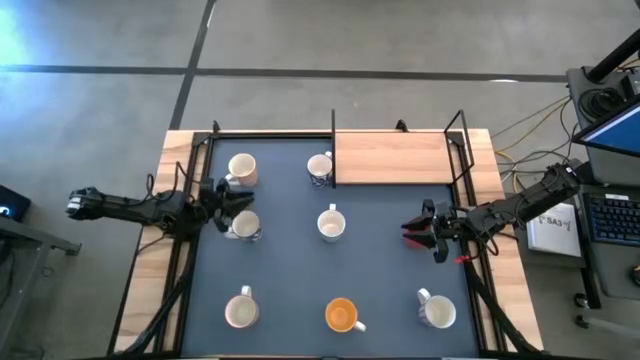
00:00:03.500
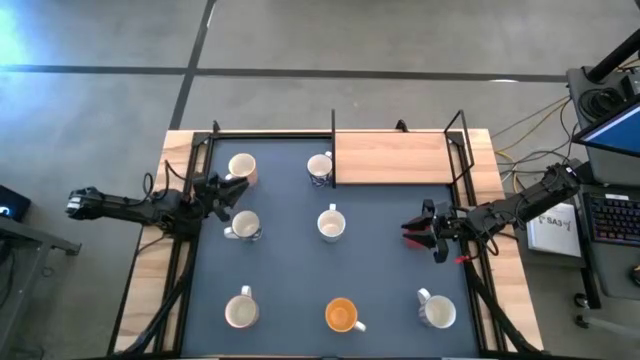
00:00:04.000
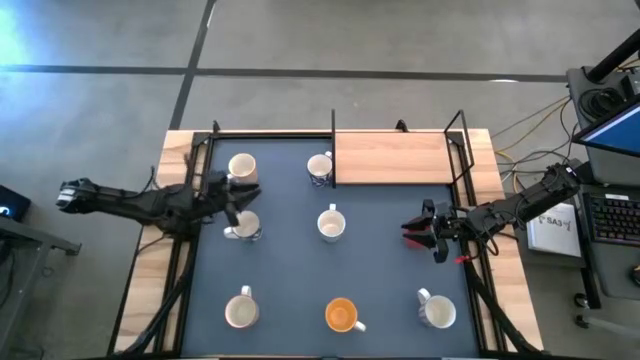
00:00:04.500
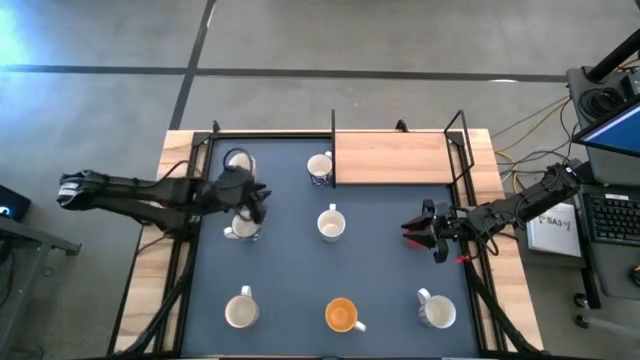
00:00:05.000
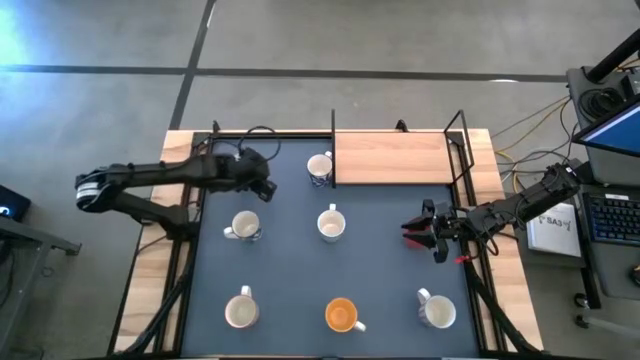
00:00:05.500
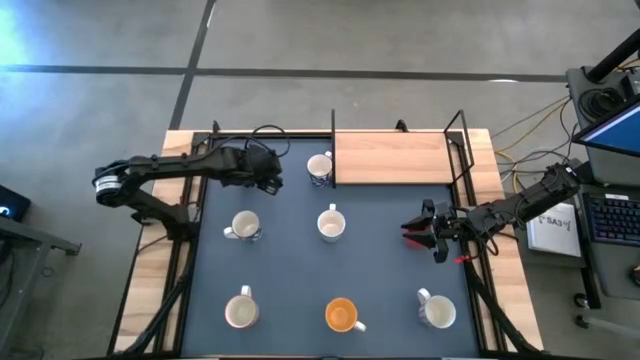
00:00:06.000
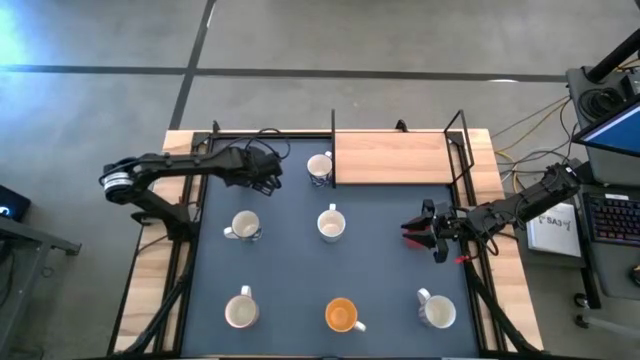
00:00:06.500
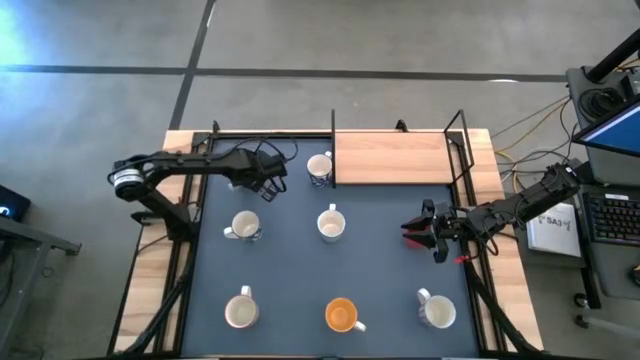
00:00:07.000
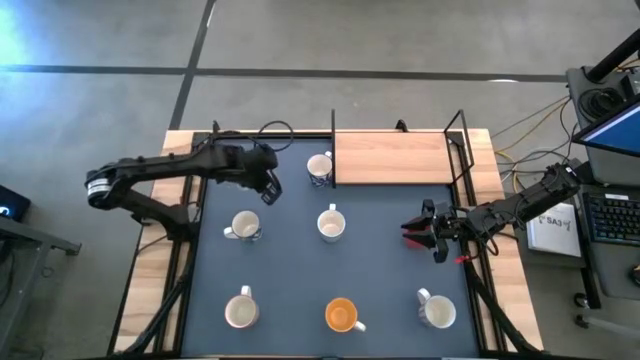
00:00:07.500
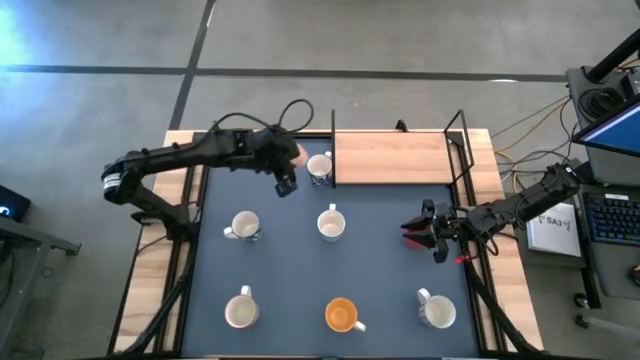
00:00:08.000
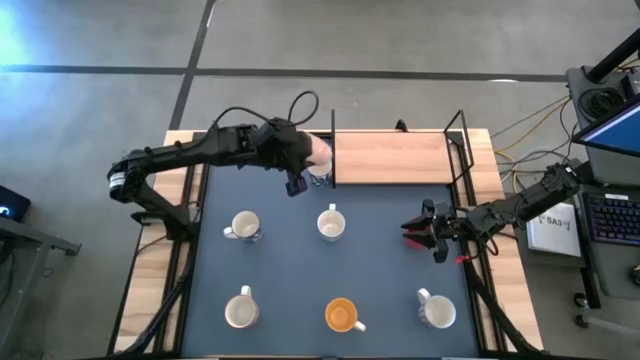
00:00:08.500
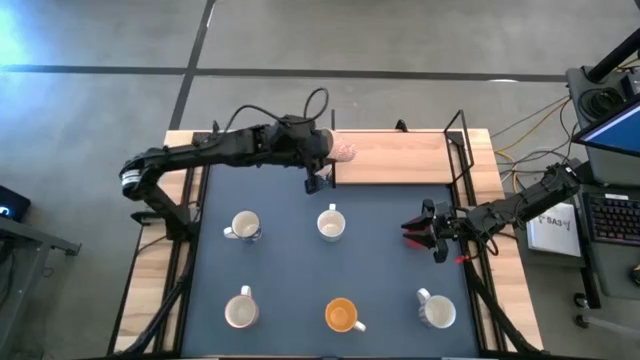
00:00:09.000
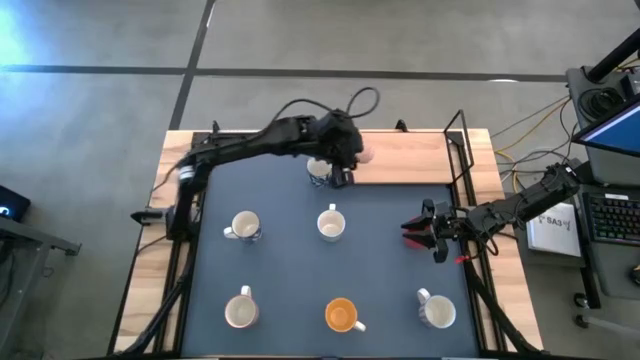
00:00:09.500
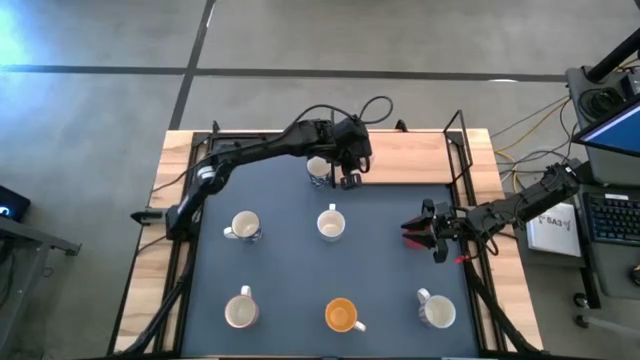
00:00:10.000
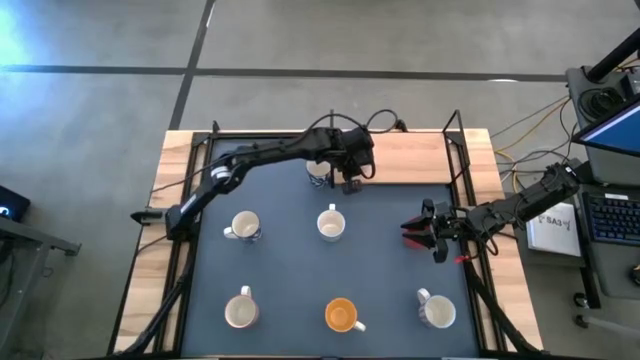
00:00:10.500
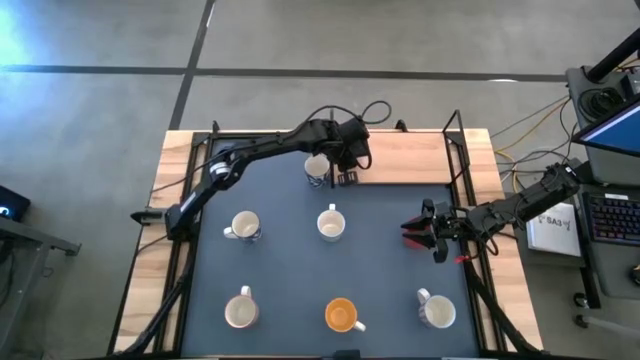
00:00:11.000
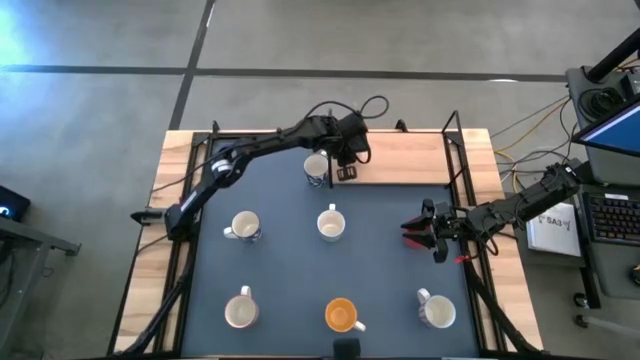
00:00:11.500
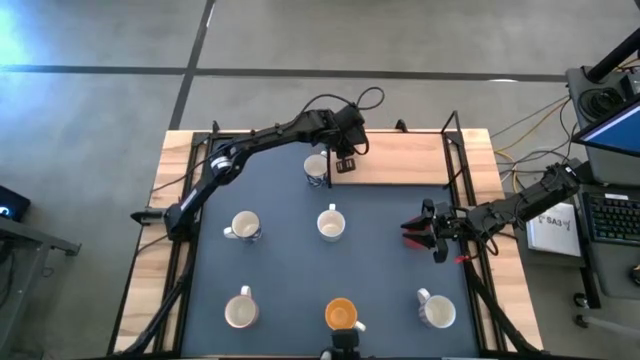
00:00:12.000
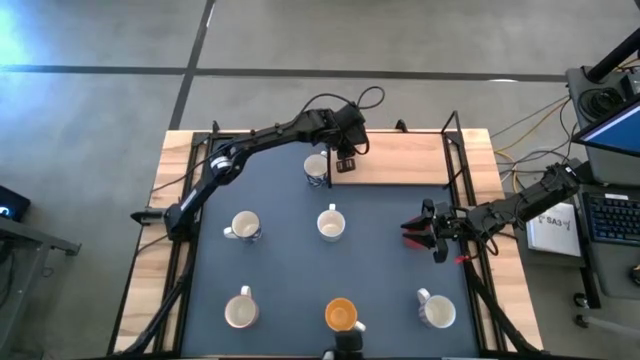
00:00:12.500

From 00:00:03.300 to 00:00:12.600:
Task: Place coffee mugs
Put the orange mug on the shelf

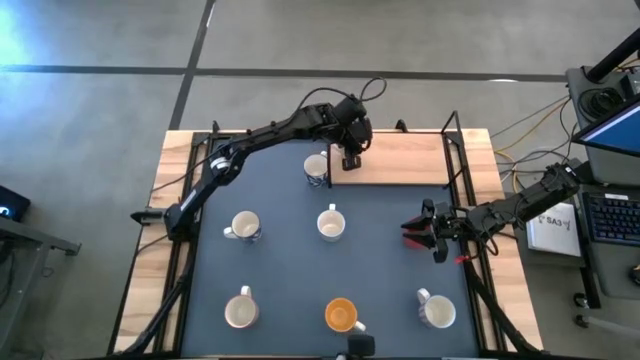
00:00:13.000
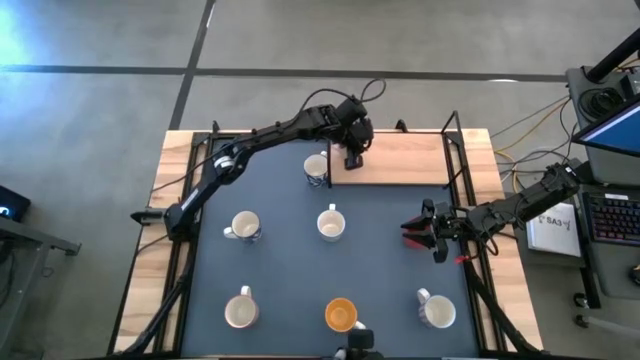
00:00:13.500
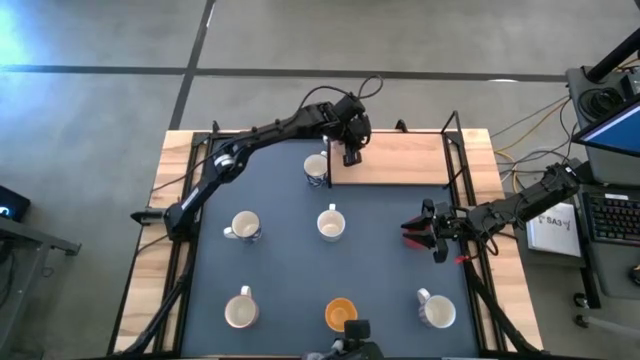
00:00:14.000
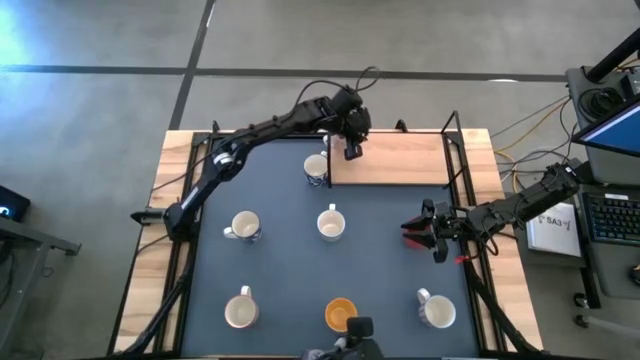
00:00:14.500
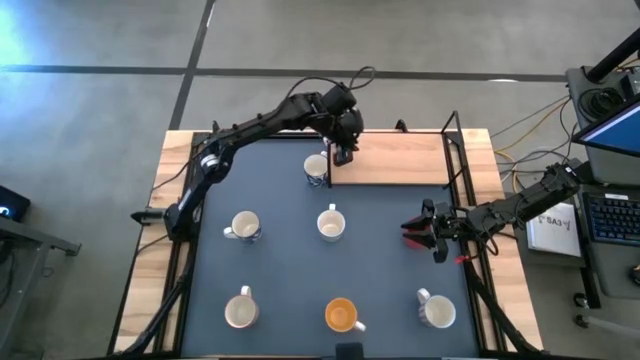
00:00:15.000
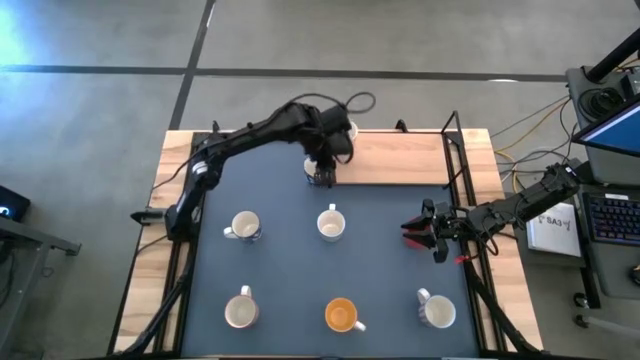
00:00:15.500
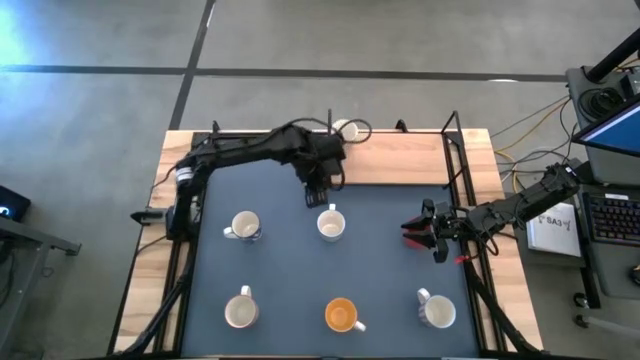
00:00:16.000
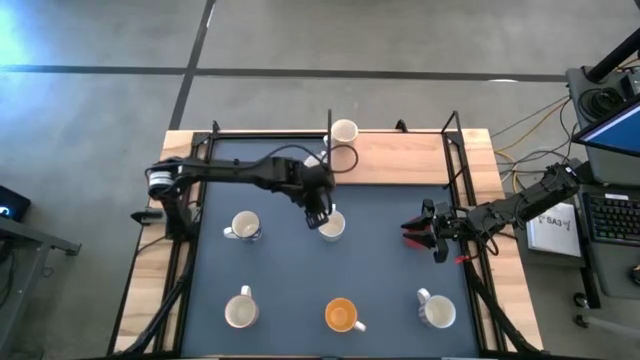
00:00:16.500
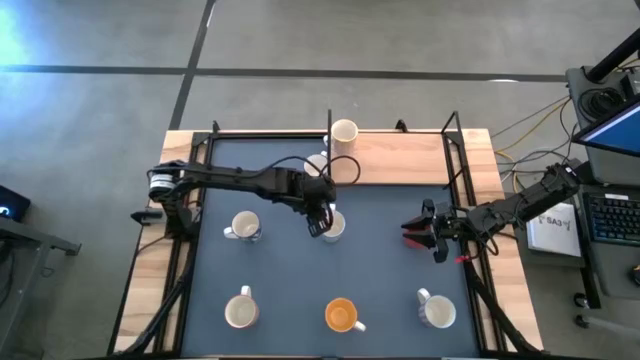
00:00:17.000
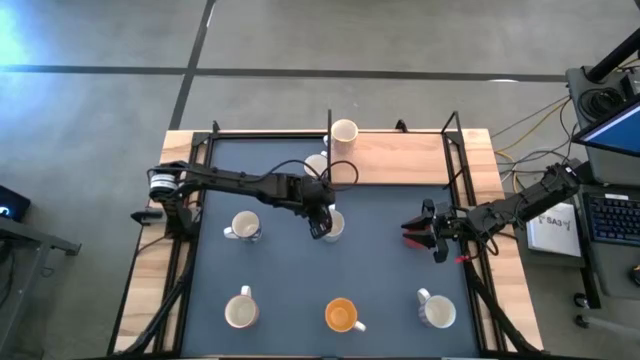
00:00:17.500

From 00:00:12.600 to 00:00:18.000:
Put the green mug on the shelf

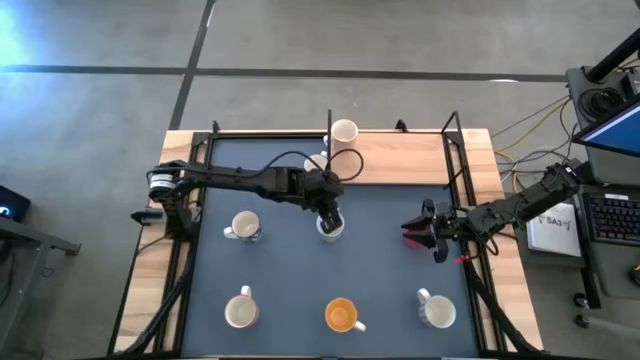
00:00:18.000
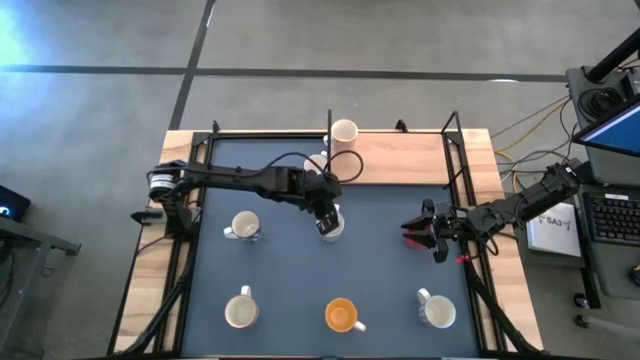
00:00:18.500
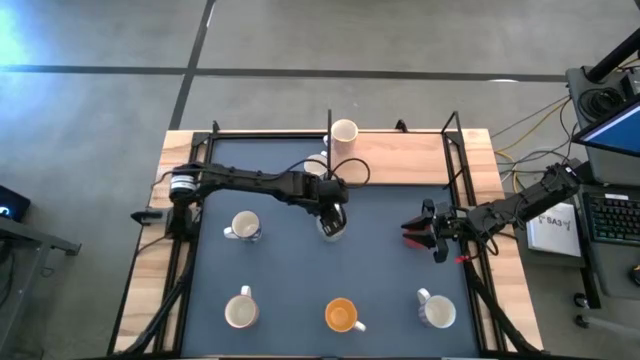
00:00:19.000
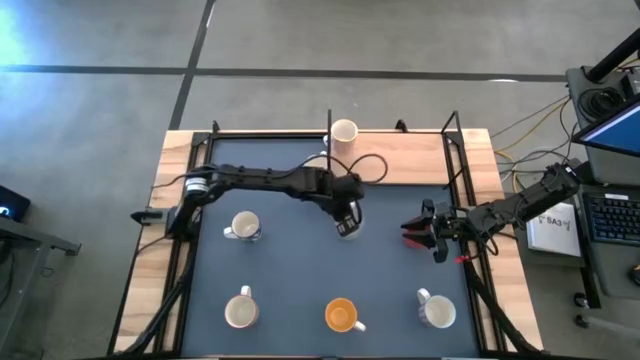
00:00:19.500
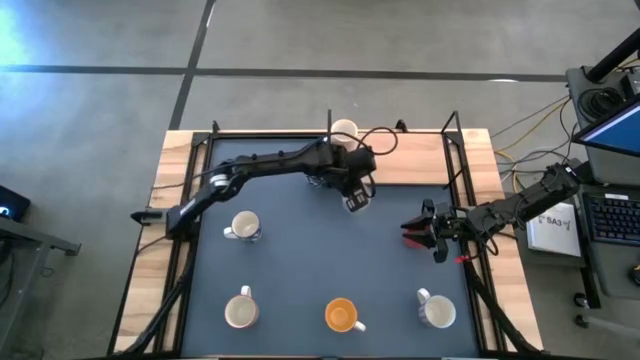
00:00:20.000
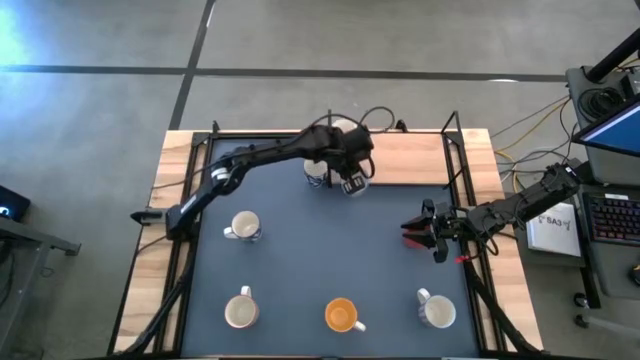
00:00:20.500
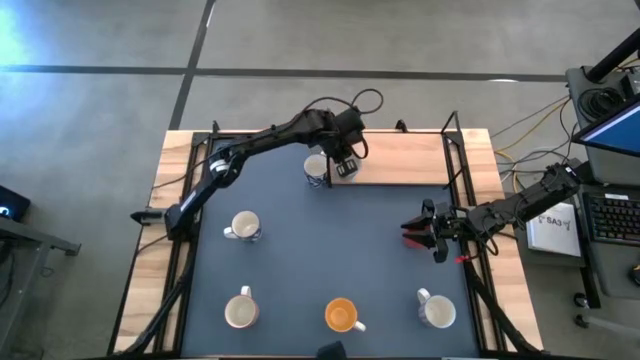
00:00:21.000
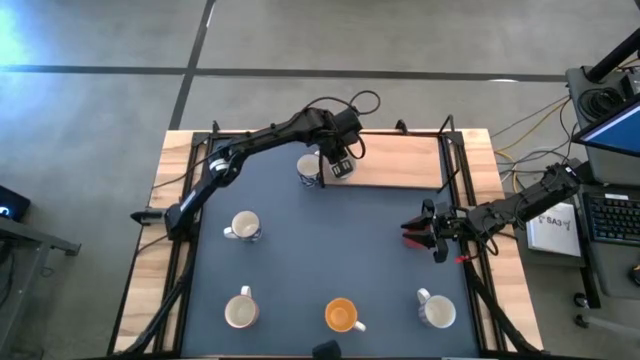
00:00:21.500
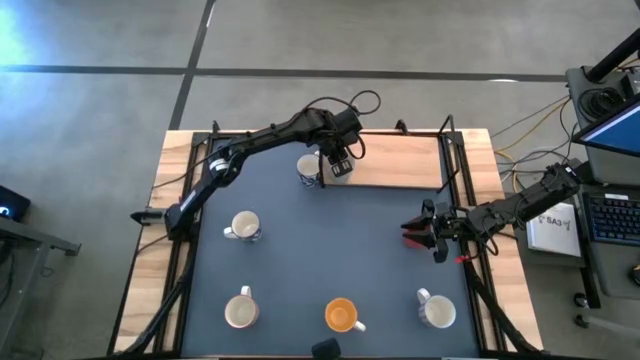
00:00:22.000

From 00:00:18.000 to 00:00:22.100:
Put the green mug on the shelf
